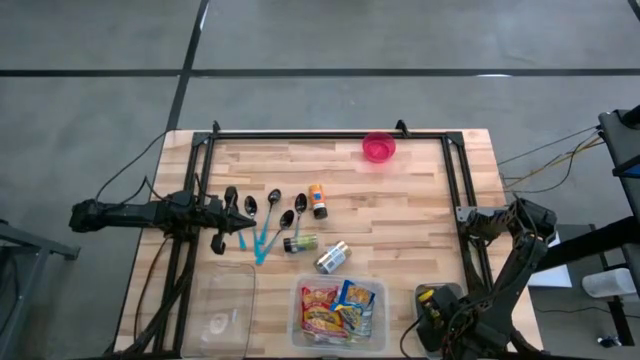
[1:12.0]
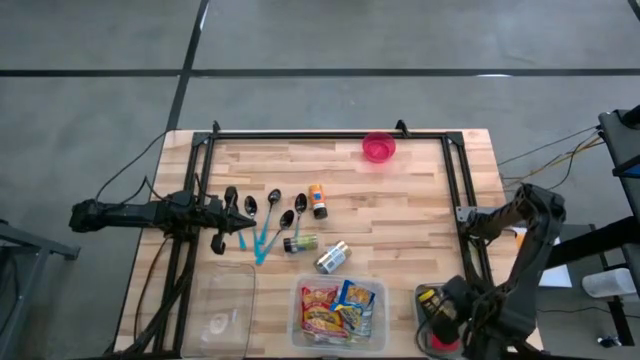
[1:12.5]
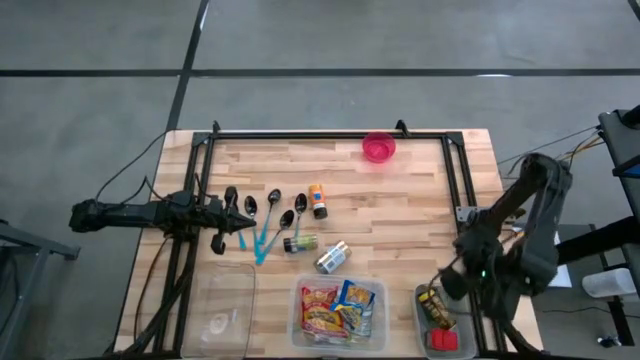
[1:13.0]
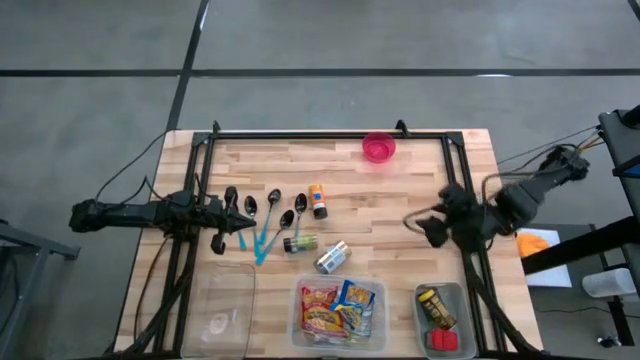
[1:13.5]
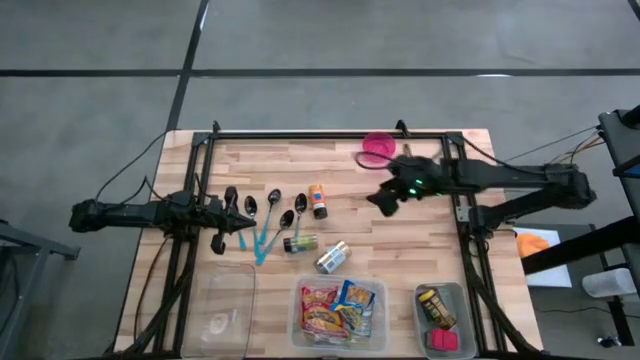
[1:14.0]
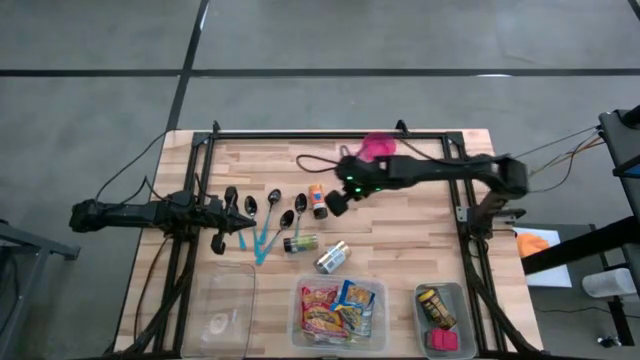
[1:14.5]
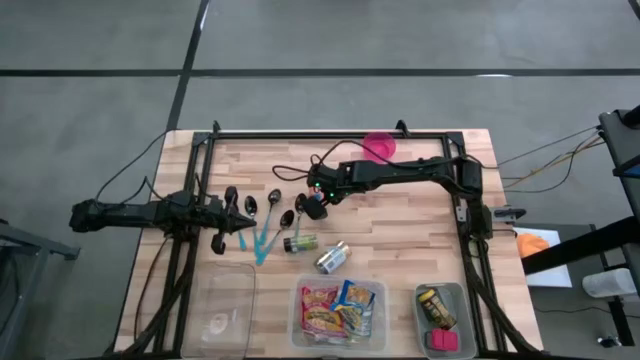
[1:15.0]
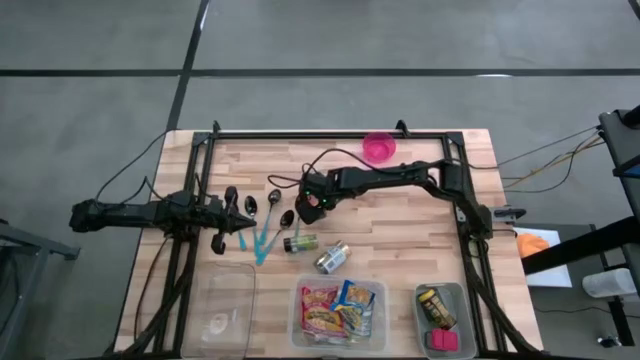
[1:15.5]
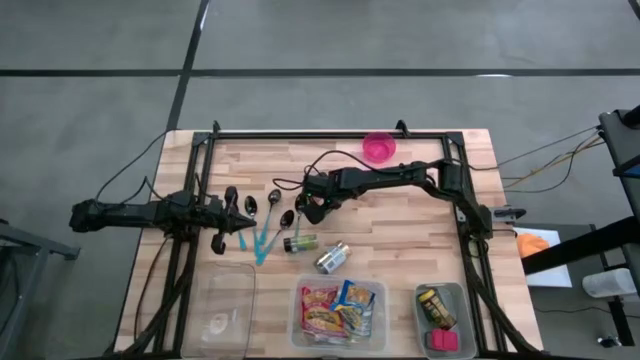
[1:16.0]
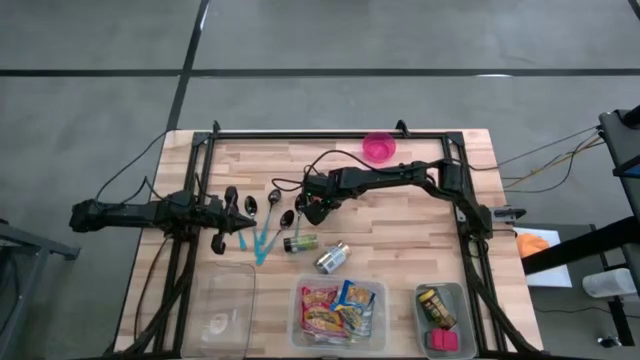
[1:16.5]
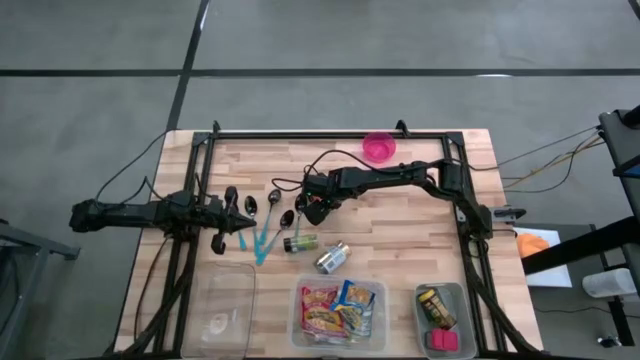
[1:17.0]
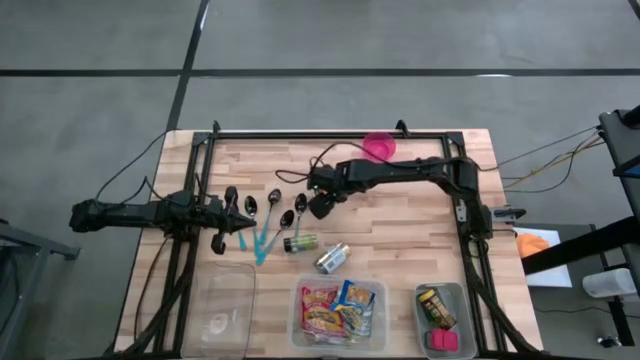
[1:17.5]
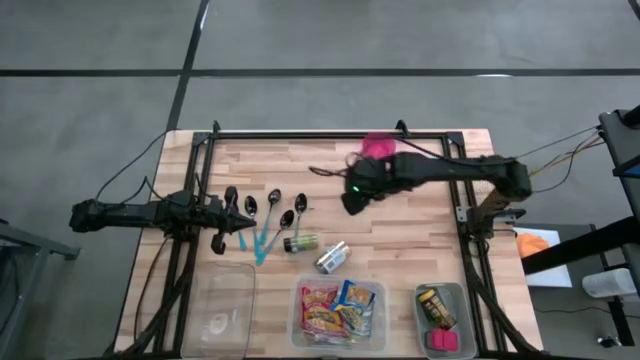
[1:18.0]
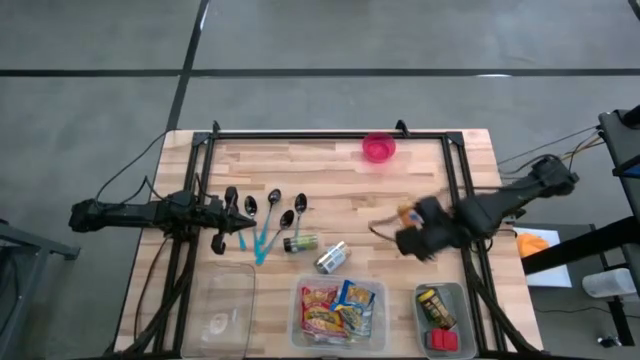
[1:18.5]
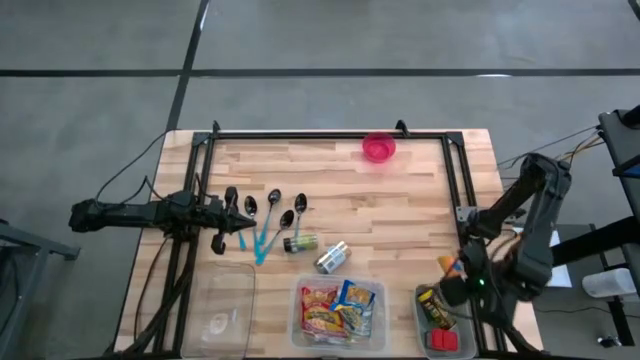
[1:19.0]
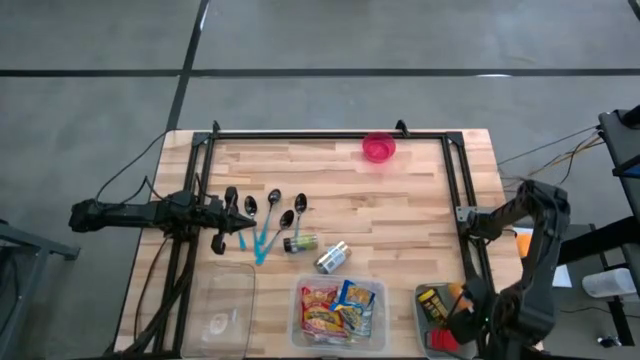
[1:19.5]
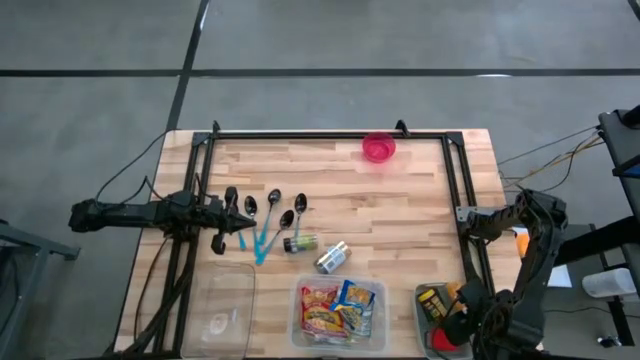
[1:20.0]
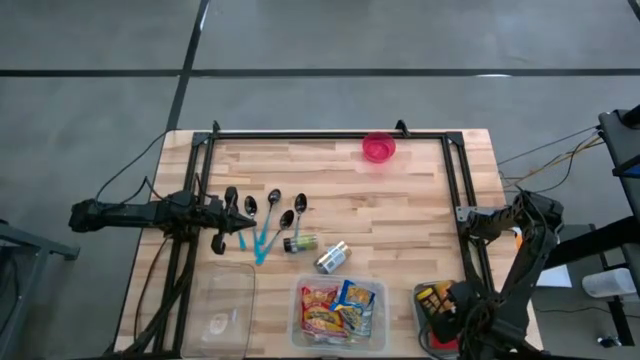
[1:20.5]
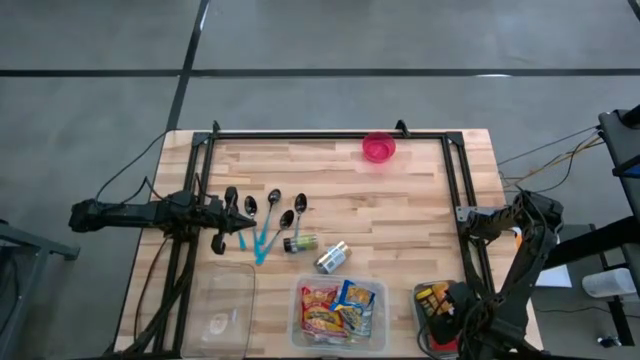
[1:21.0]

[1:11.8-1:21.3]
Put the orange seasoning bottle into the gray bin

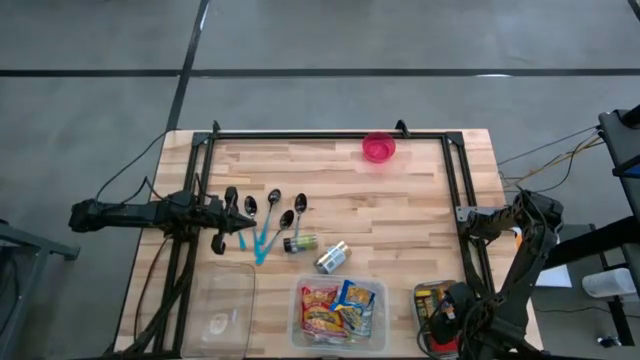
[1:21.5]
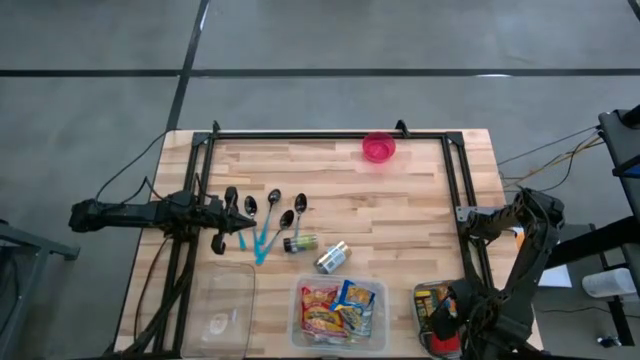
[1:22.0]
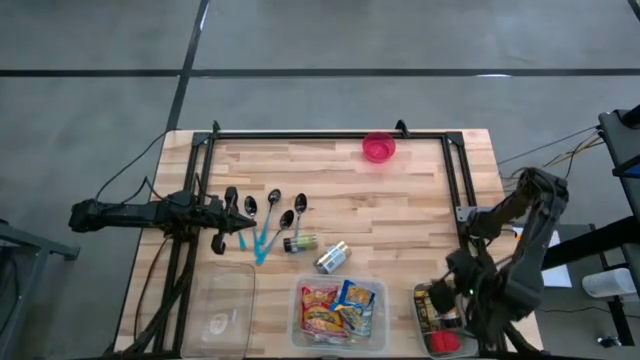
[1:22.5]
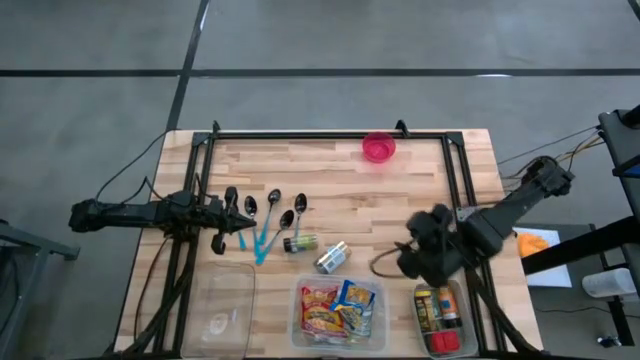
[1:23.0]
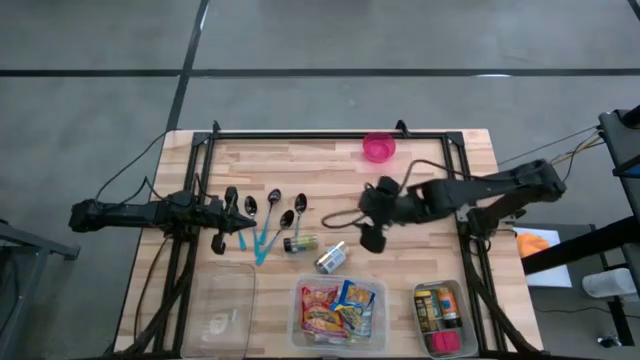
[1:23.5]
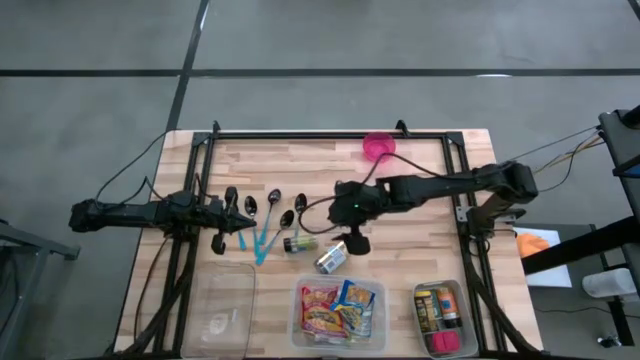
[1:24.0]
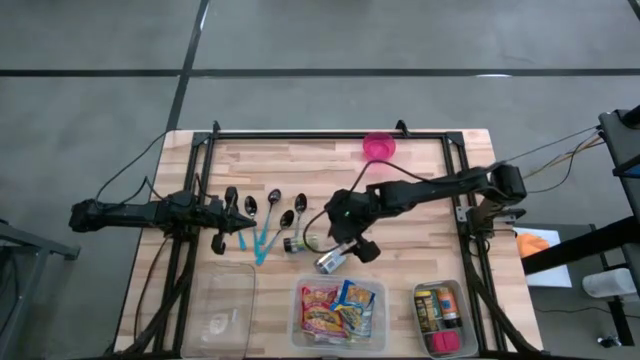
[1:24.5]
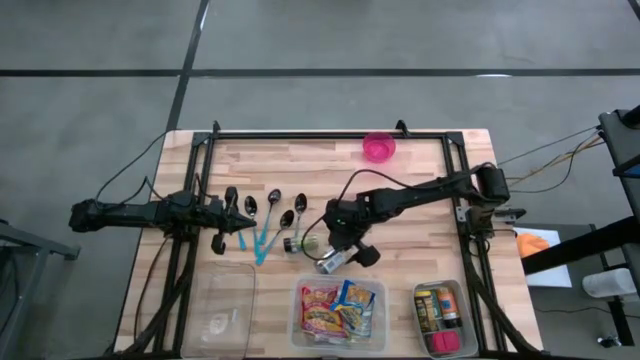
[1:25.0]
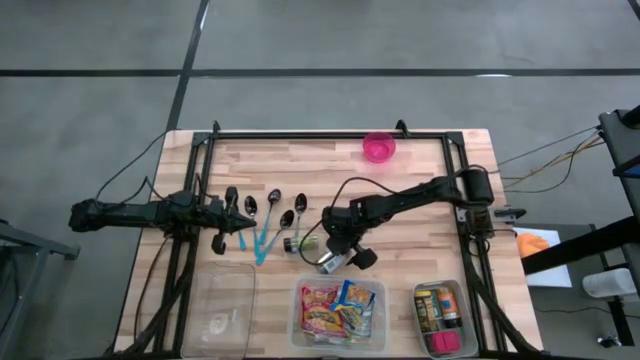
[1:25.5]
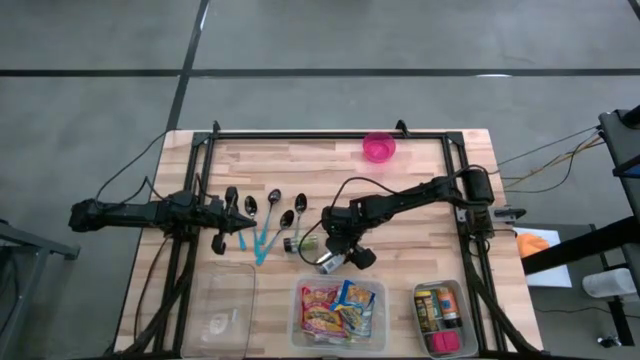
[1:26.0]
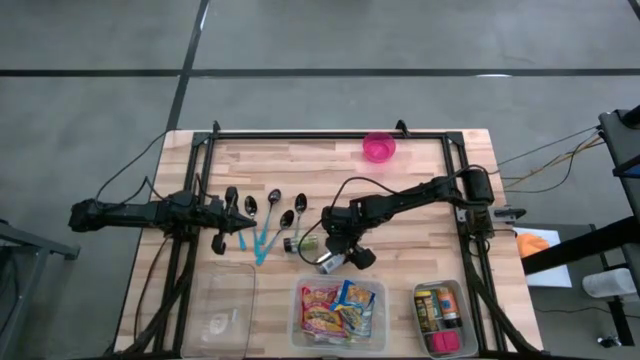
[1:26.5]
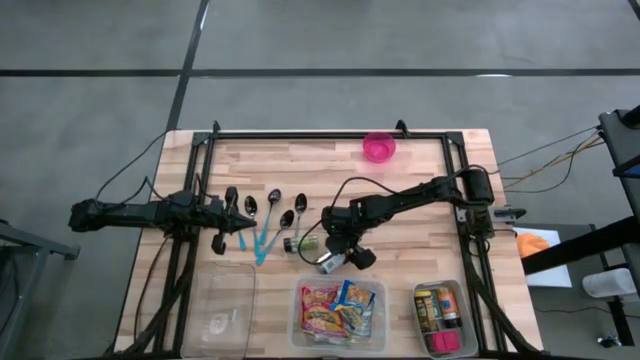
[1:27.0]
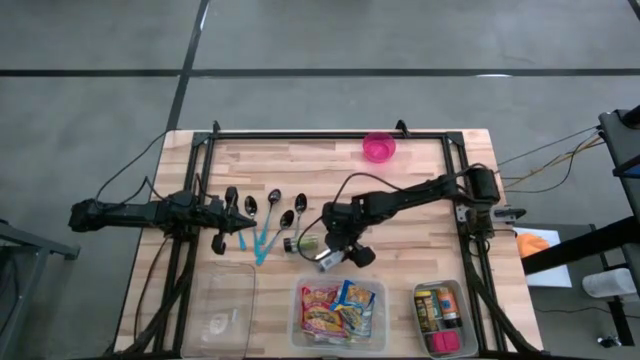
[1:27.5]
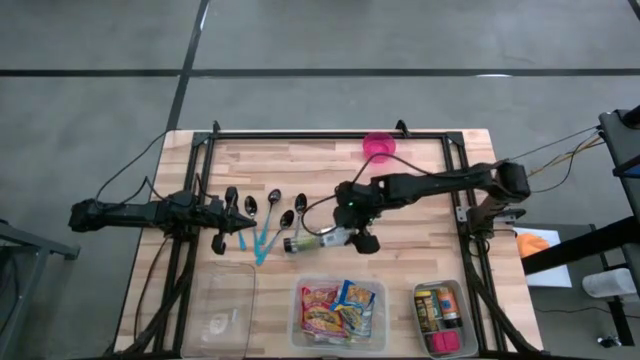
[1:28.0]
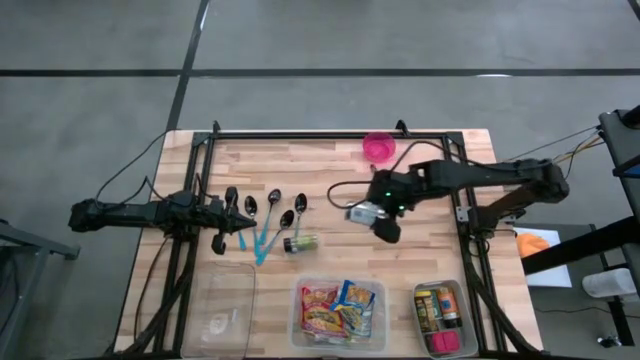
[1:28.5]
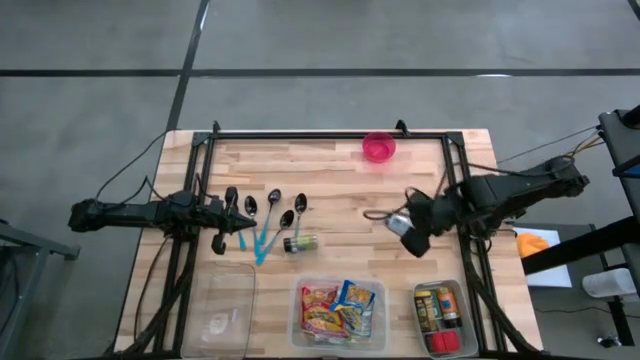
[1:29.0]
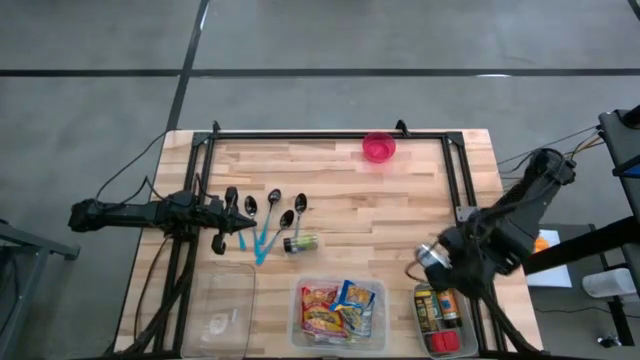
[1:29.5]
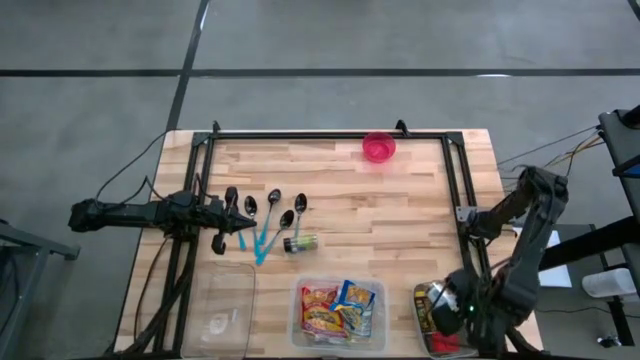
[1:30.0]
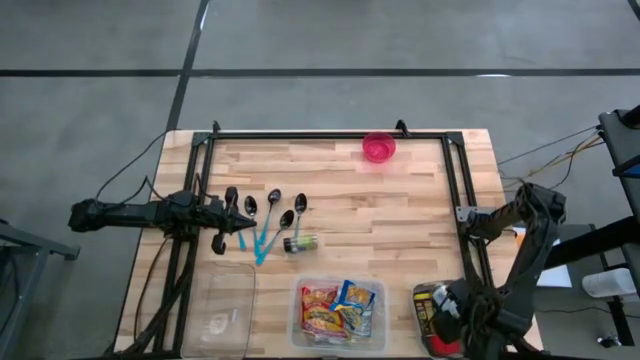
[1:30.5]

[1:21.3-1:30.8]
Put the golden seasoning bottle into the gray bin
